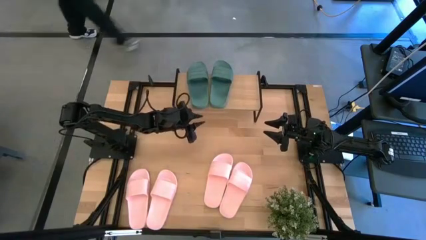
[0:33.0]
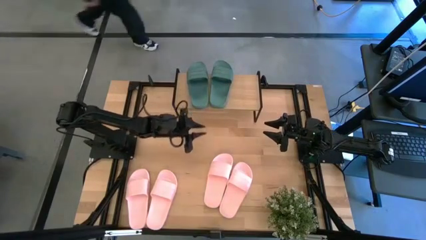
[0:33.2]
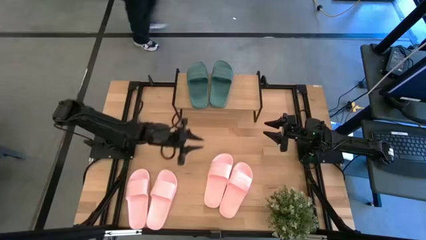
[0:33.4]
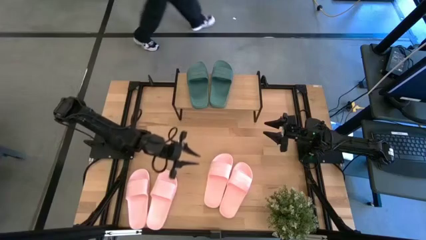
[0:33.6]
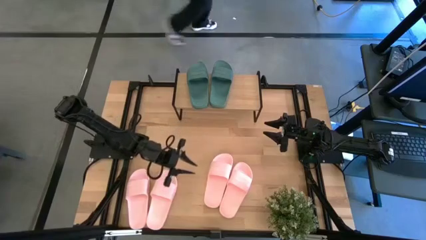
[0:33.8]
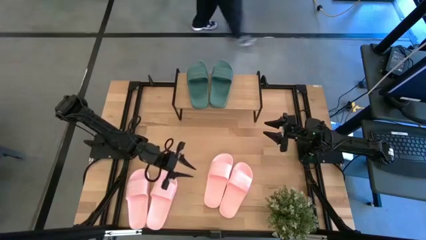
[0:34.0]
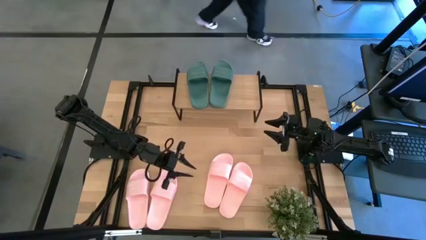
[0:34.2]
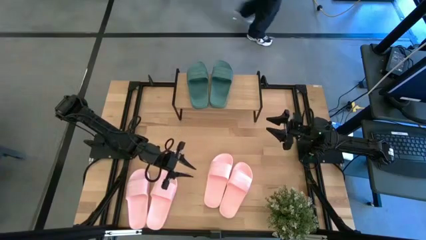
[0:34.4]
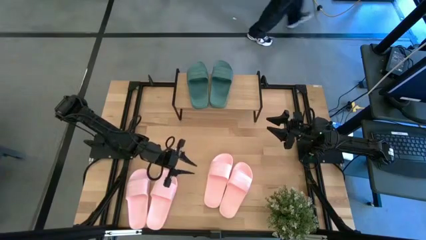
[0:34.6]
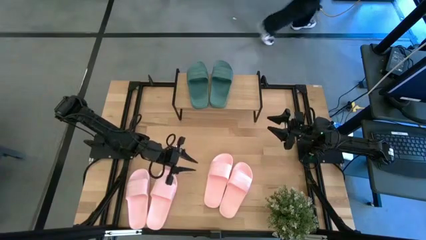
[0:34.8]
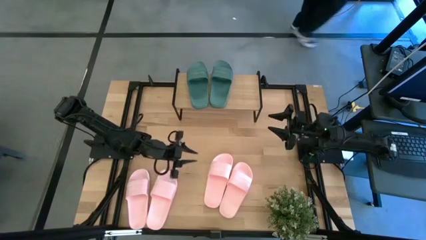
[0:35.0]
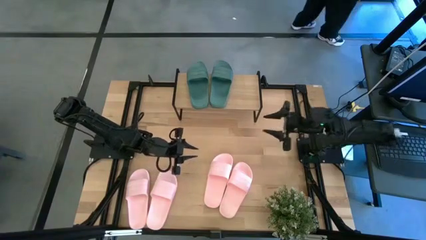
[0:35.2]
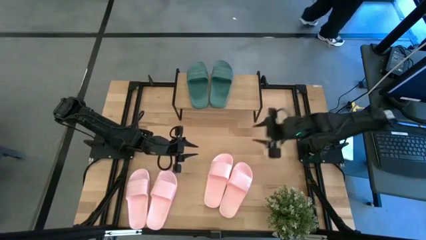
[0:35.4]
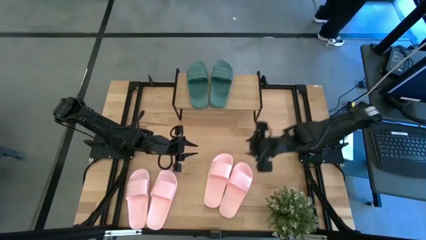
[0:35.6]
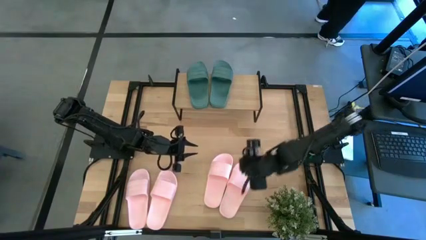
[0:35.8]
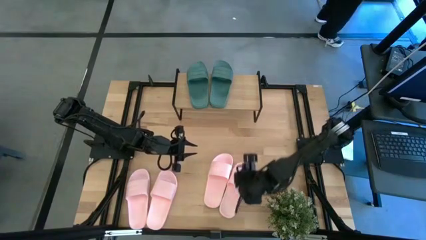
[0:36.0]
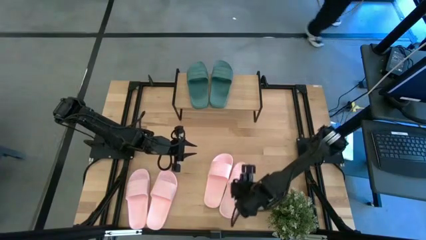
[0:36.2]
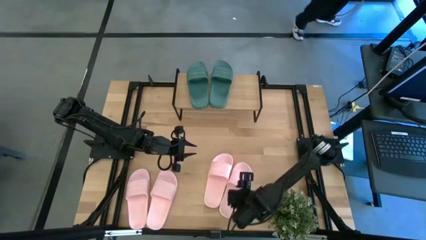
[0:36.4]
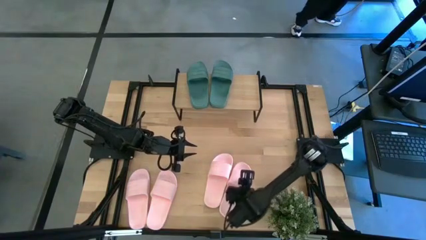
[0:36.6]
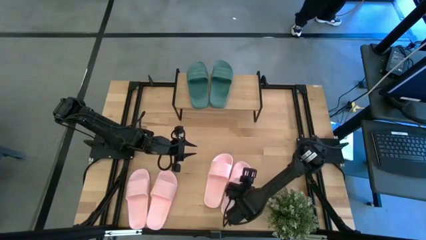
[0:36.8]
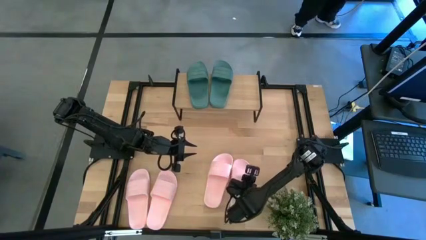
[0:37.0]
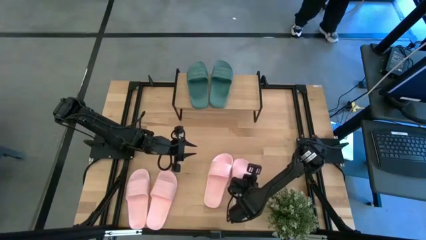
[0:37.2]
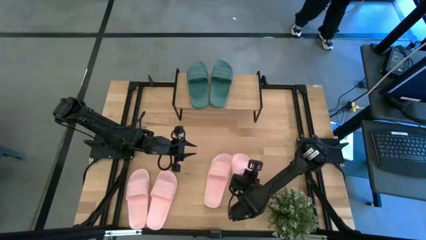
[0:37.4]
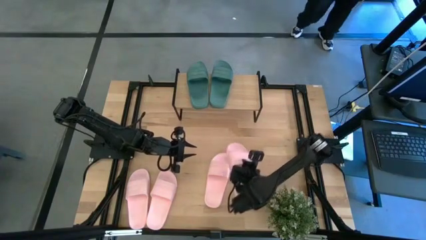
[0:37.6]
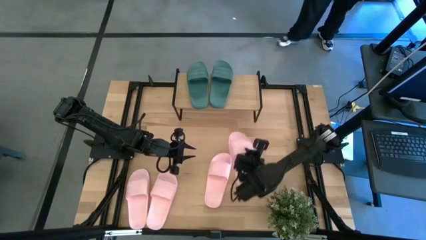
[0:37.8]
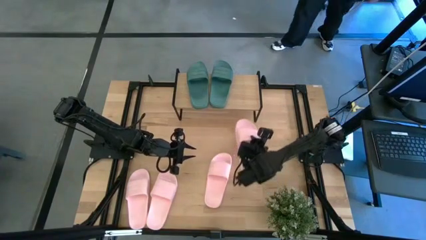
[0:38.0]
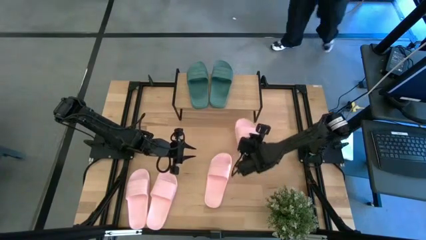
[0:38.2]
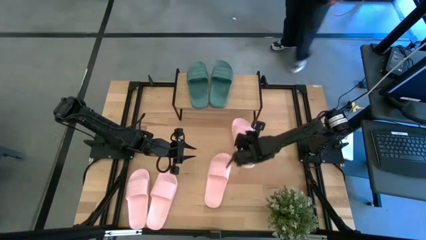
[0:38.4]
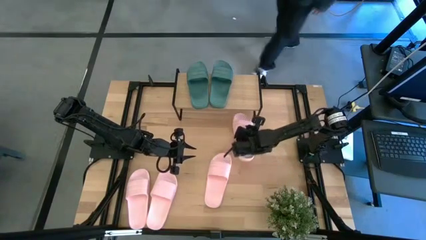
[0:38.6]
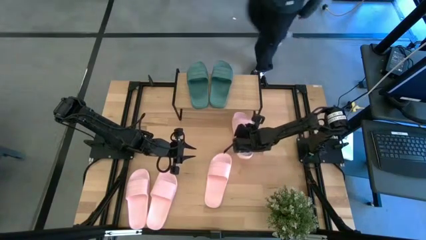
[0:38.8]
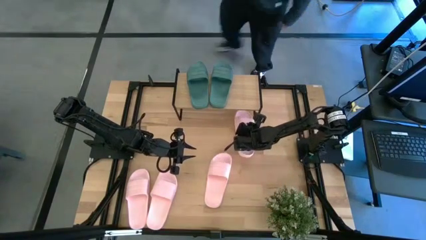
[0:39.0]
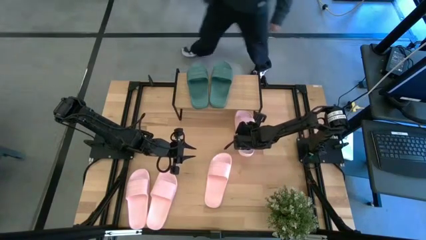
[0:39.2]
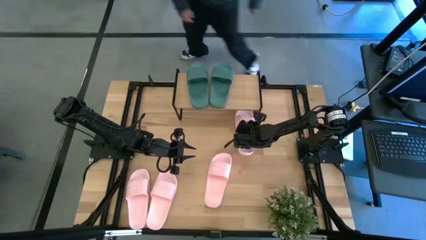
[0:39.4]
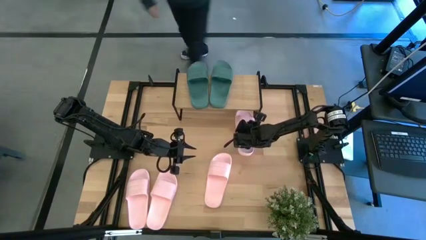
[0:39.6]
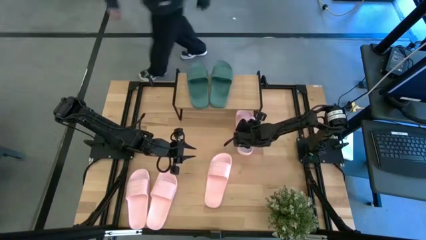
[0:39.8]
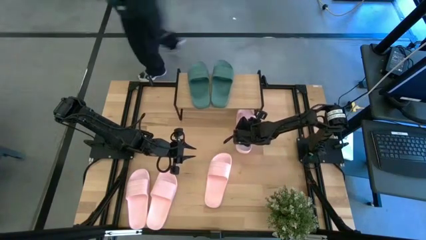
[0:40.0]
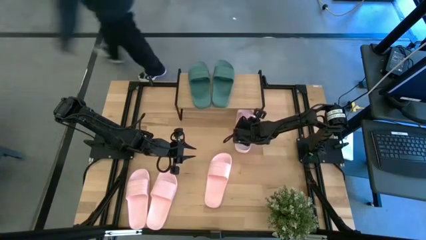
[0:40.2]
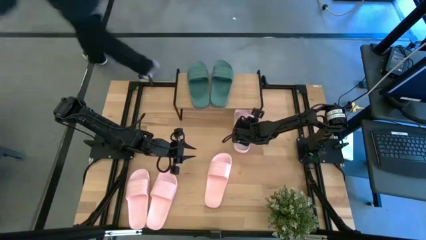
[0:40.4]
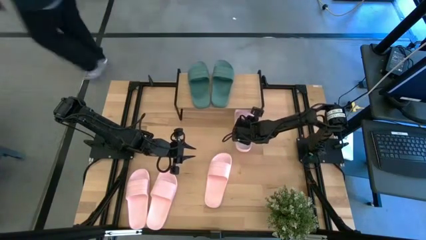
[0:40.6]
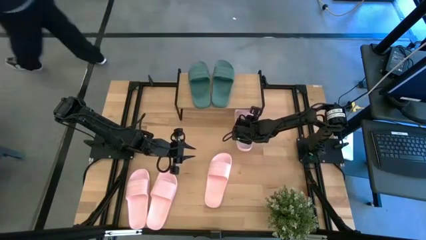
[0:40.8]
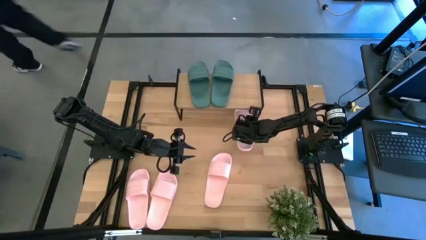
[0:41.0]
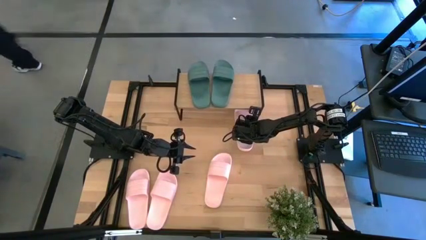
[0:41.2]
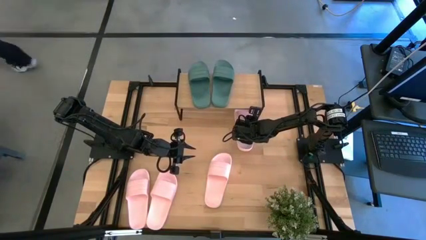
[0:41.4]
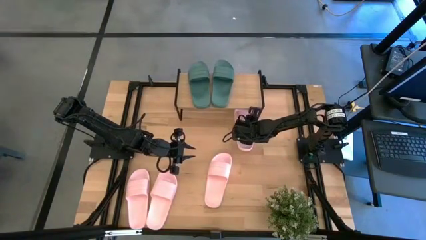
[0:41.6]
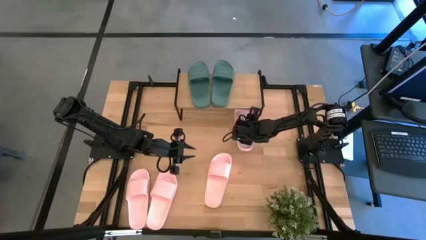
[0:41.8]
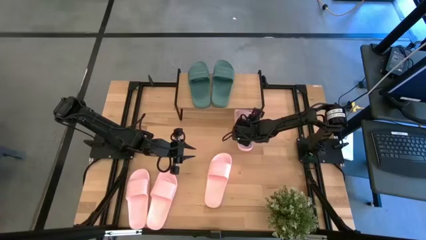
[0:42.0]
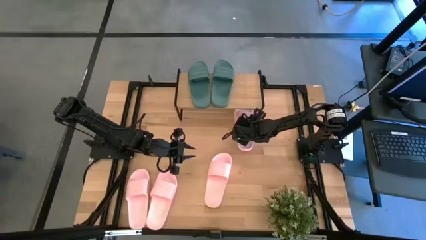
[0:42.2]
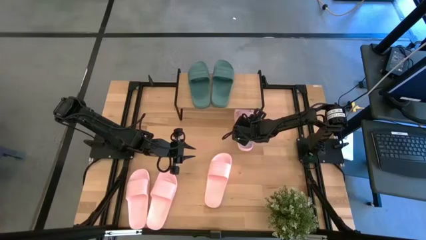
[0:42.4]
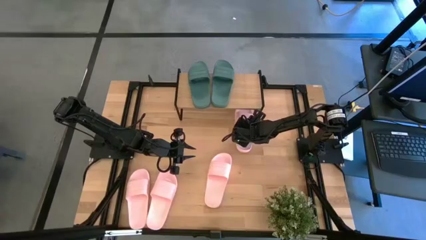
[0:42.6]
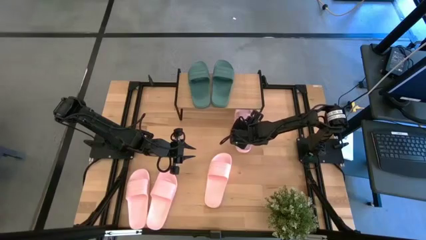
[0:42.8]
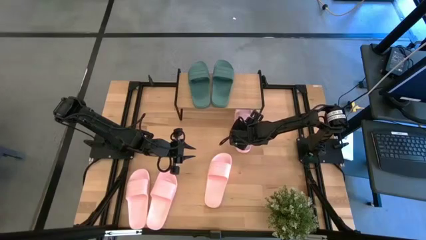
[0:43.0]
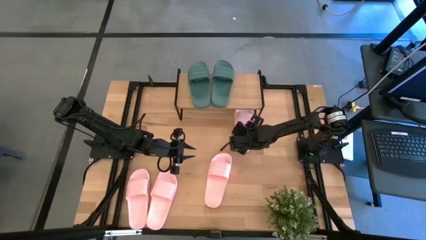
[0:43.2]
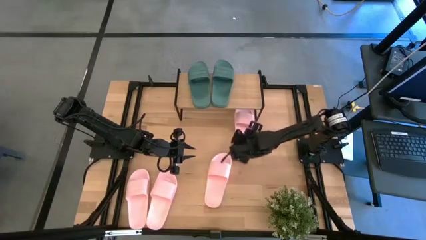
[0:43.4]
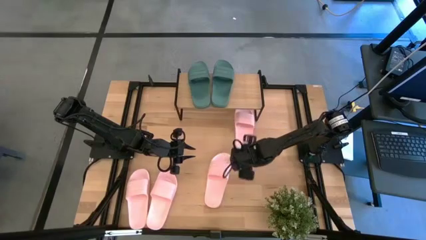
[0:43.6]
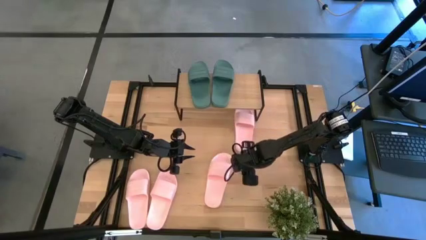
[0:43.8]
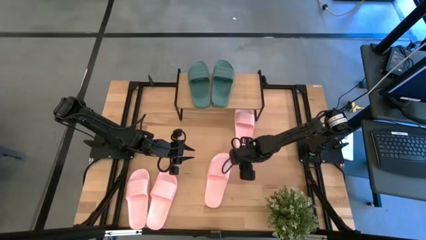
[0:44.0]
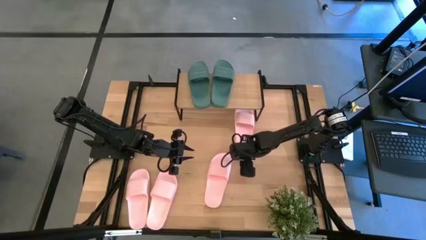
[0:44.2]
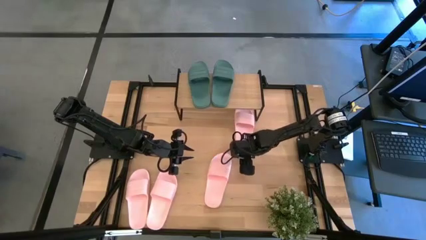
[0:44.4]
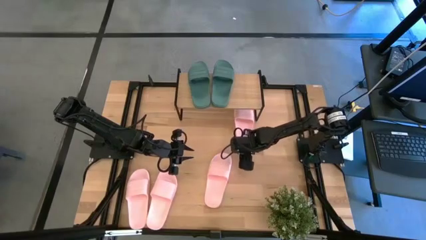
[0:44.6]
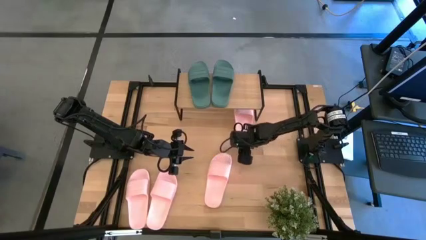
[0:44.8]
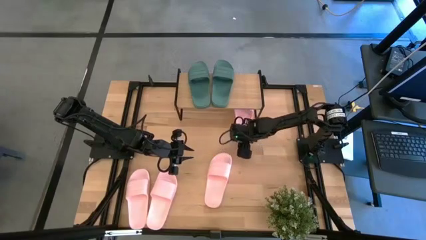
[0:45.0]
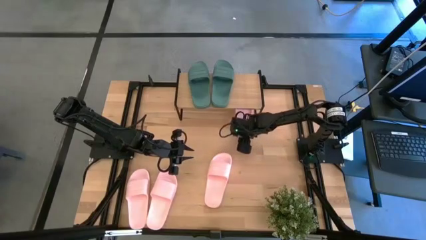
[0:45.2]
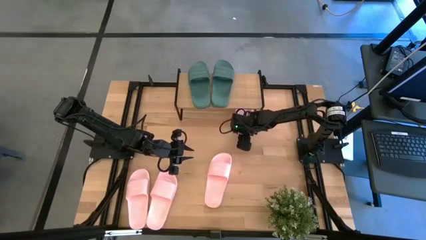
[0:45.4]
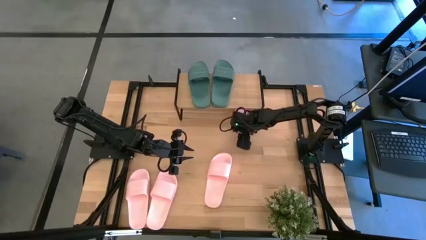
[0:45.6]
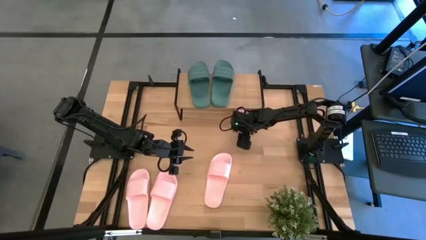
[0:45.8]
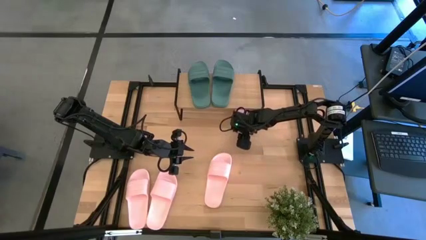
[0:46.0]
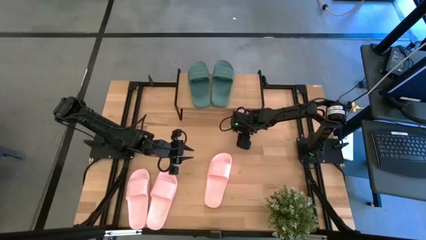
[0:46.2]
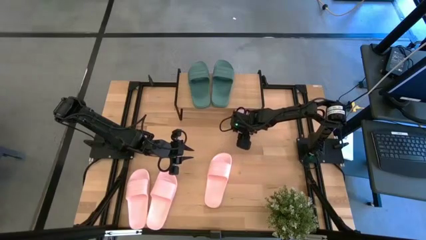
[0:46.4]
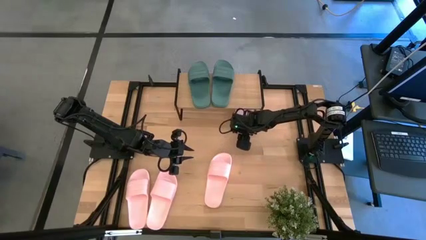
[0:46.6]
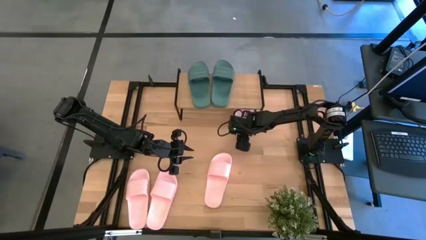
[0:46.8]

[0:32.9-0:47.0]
Task: Pick and place slides into the shelf
Put the pink slide under the shelf
